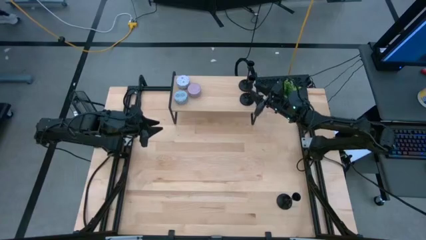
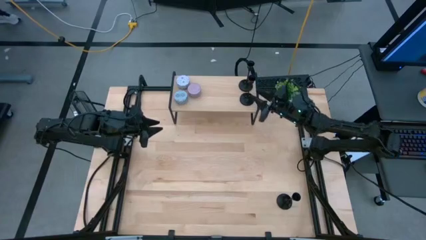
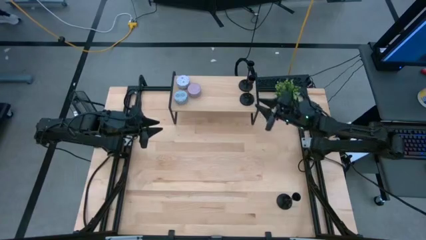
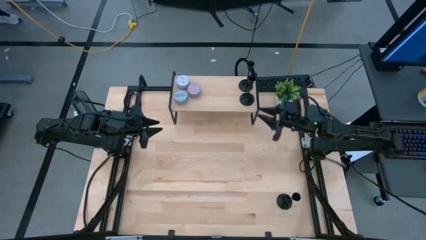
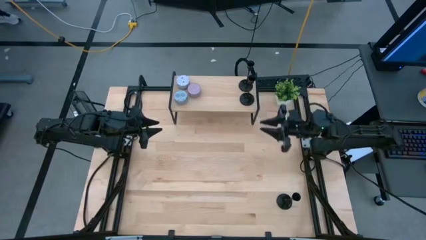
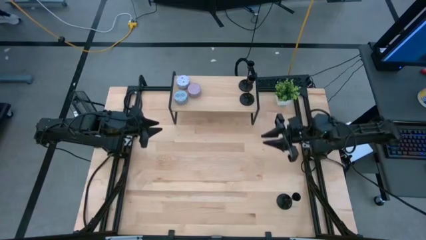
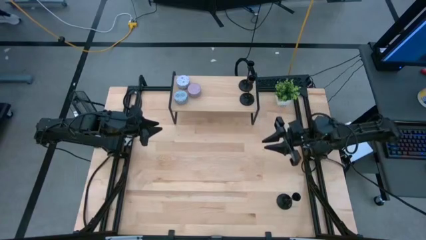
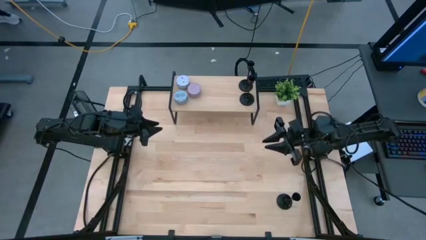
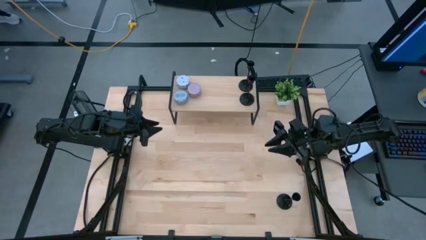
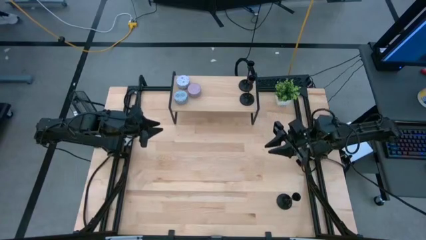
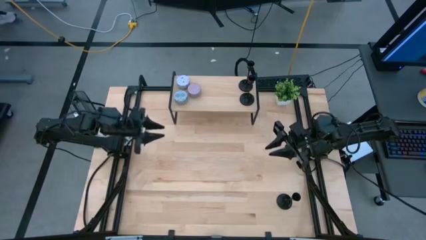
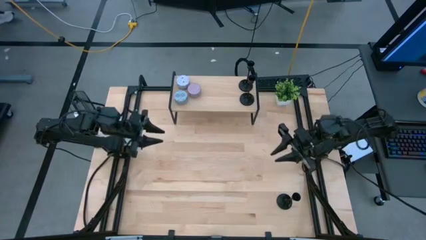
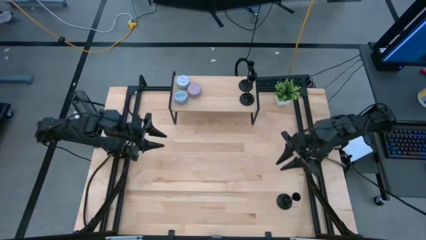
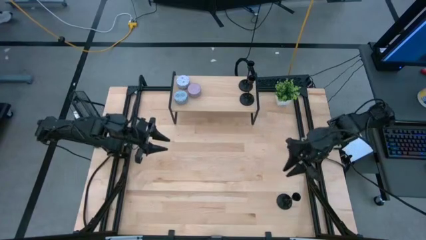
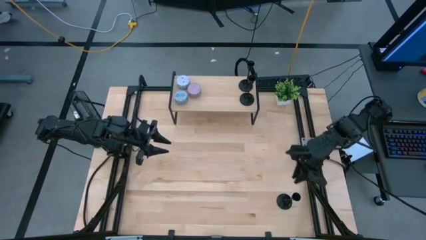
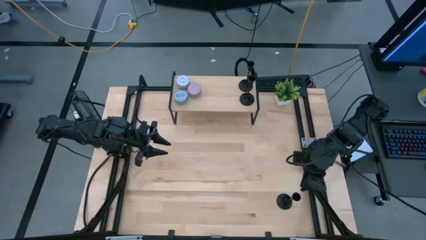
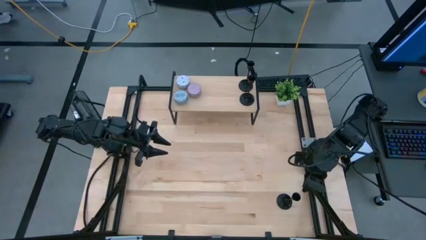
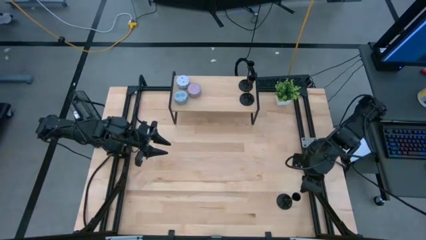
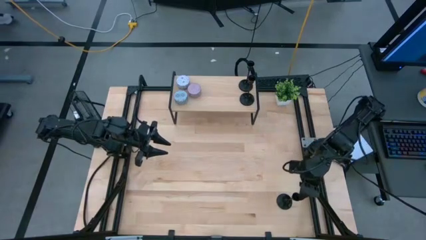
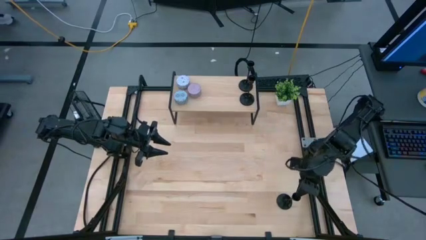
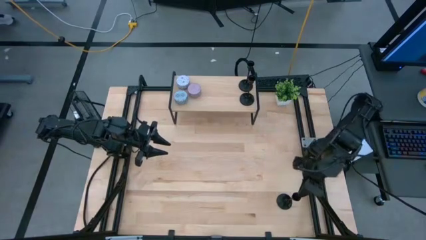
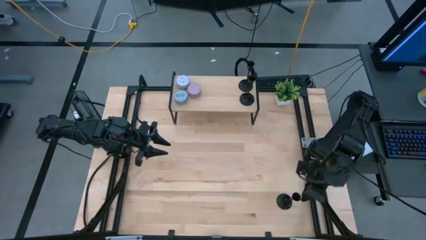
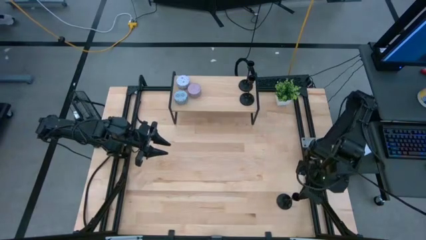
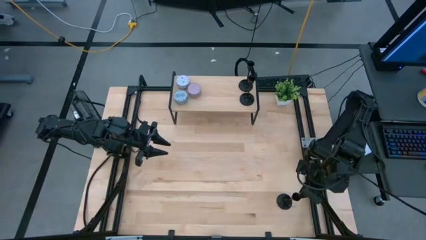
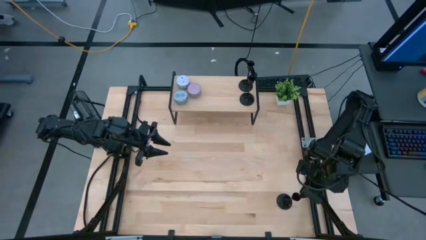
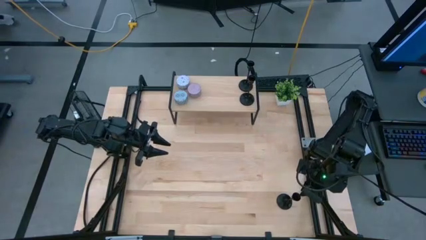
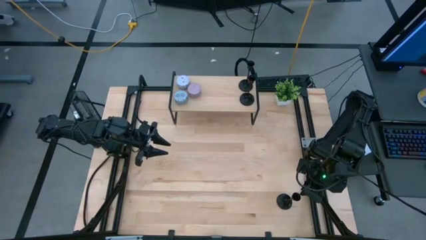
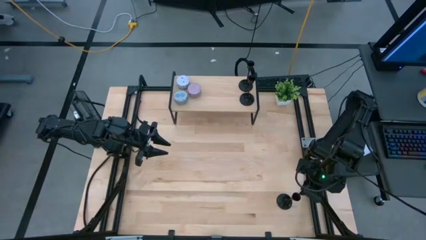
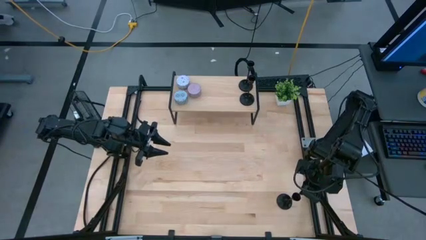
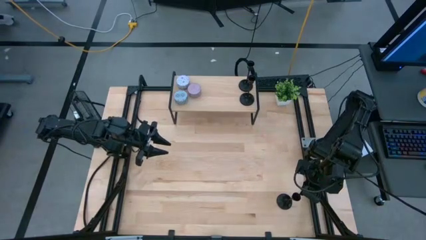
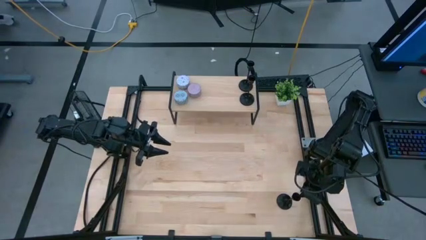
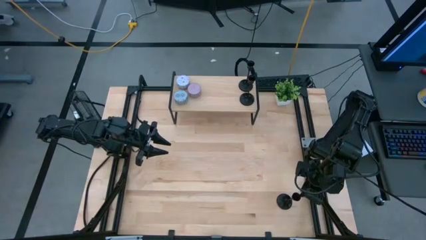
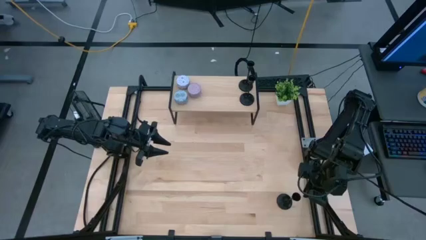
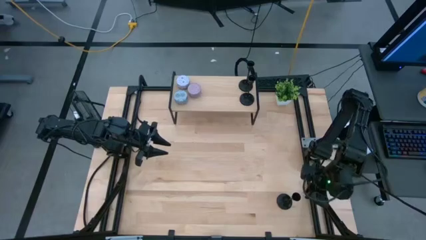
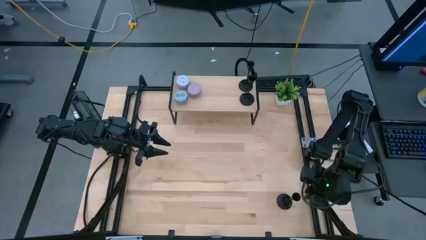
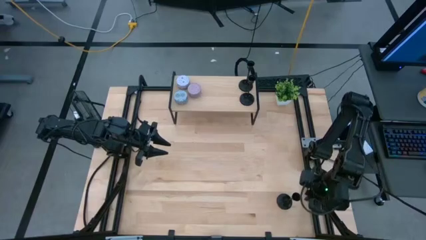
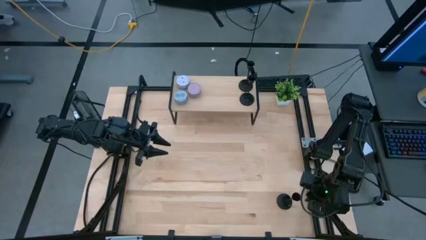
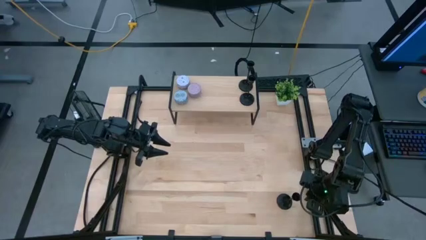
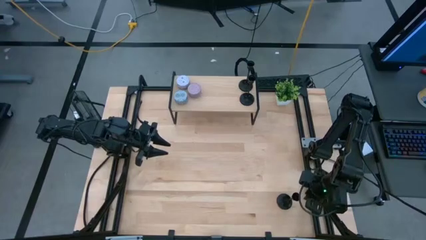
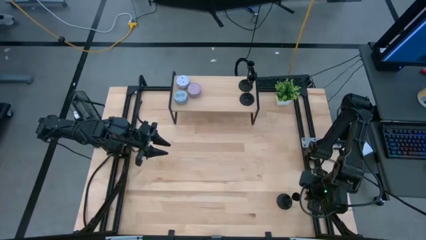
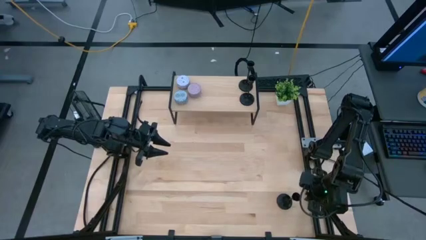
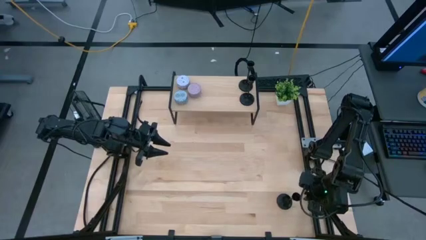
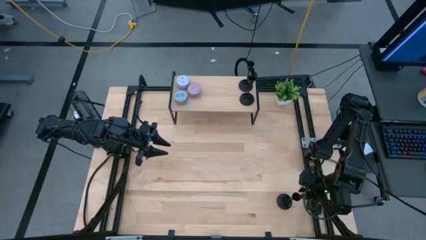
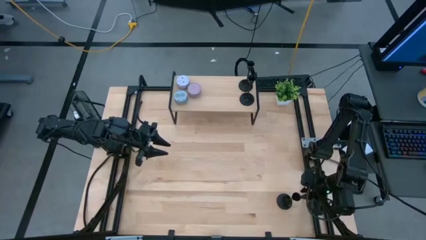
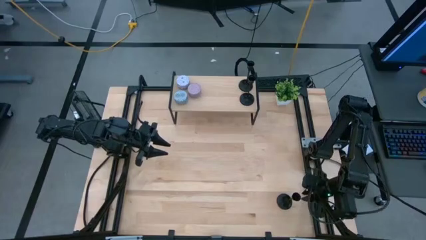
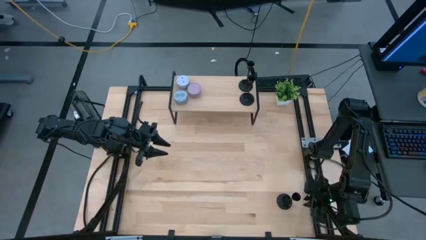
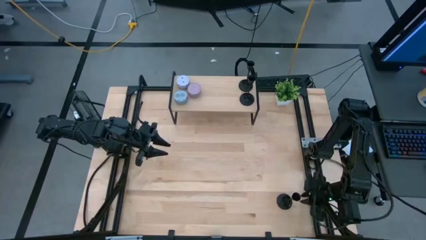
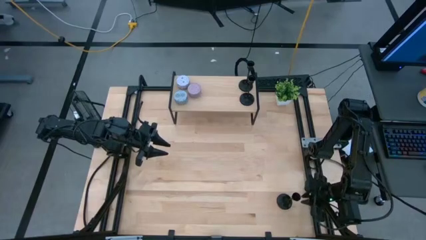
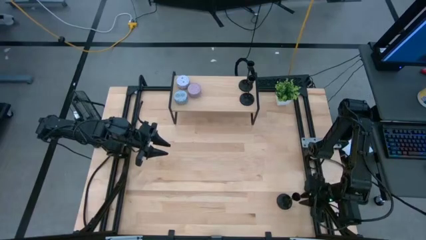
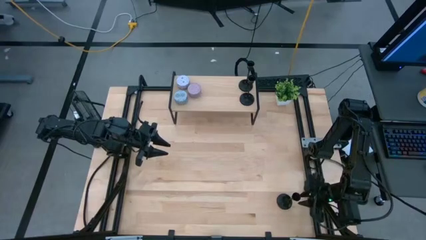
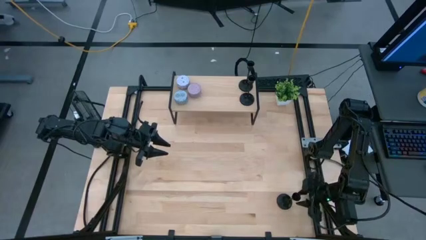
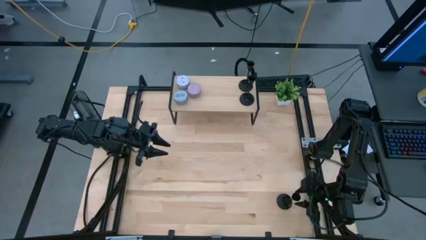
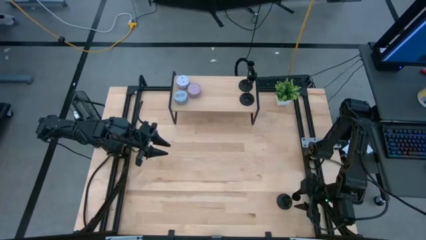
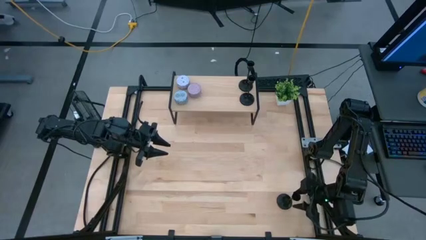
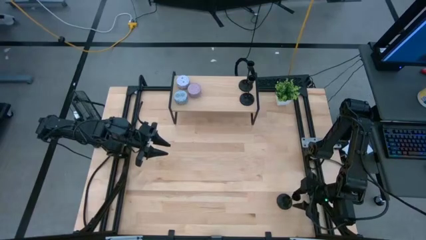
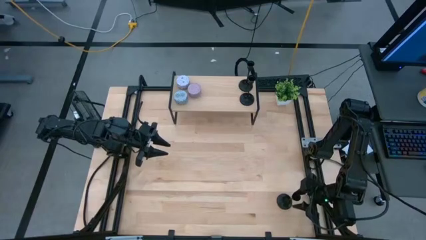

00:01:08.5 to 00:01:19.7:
Task: Pick & Place candle stick holders
Put the black candle holder on the shelf

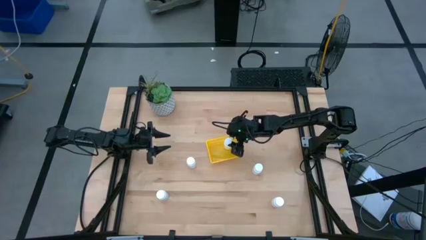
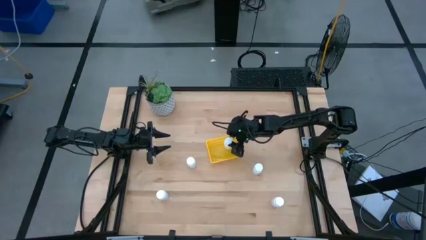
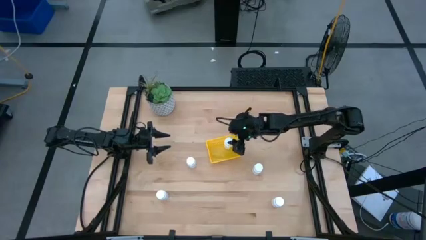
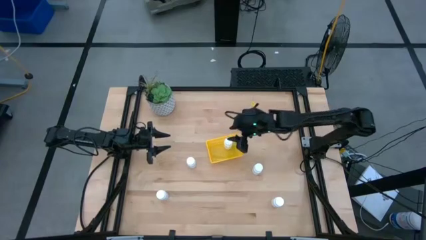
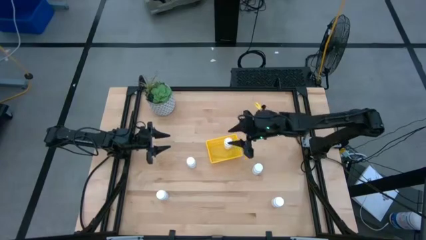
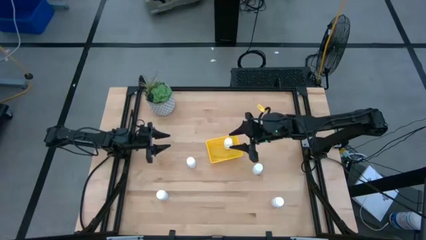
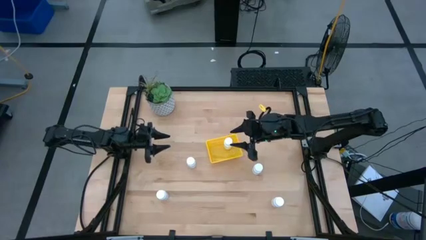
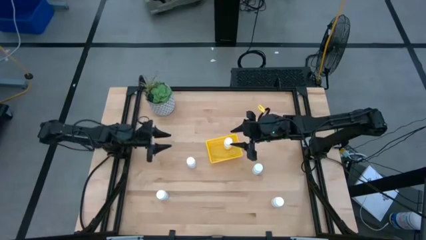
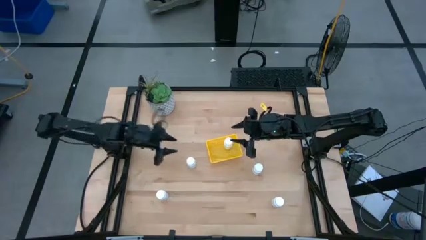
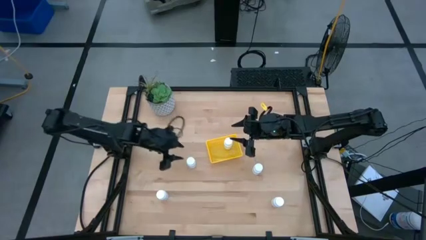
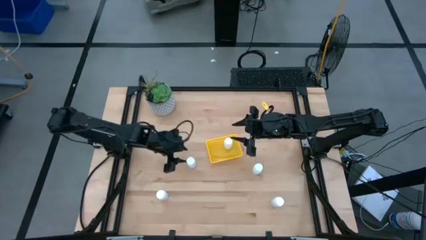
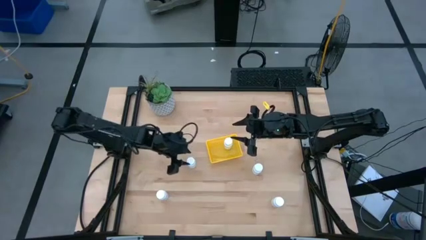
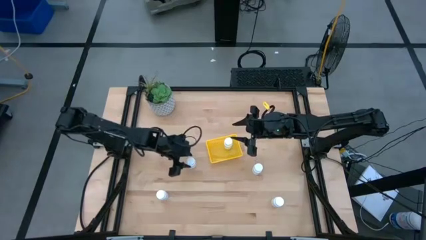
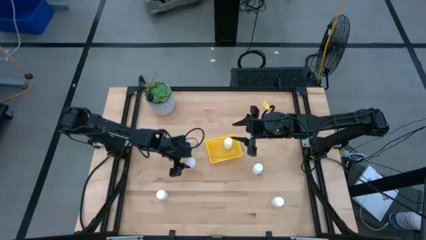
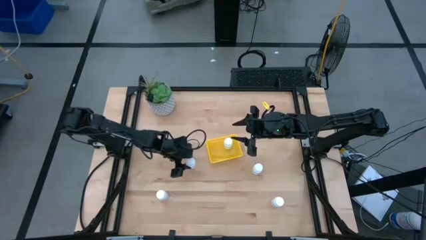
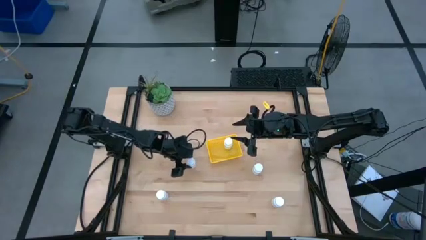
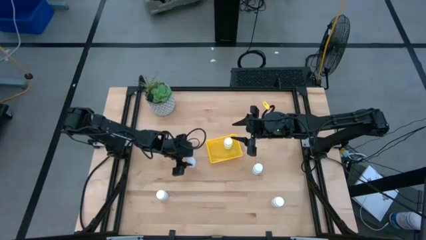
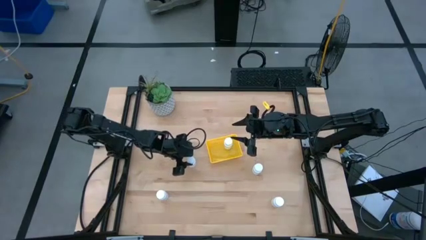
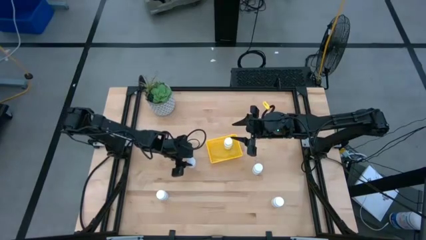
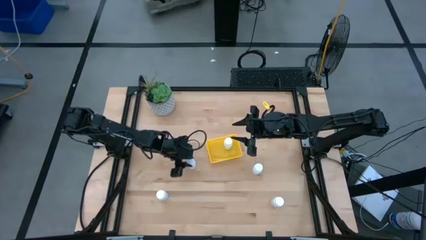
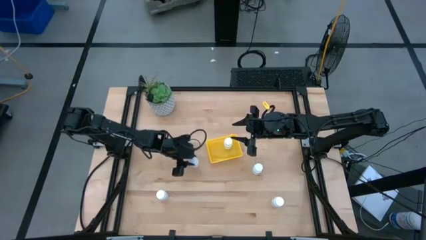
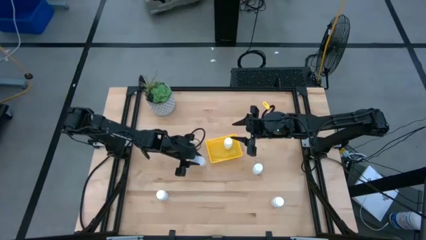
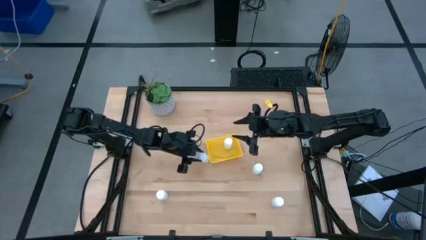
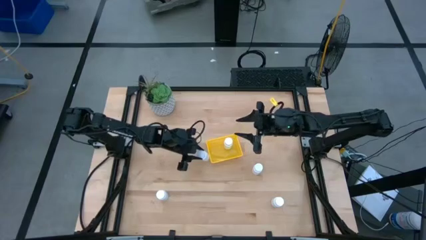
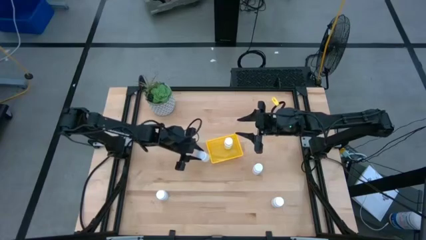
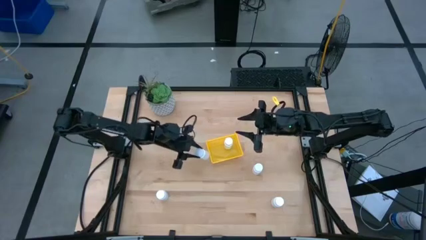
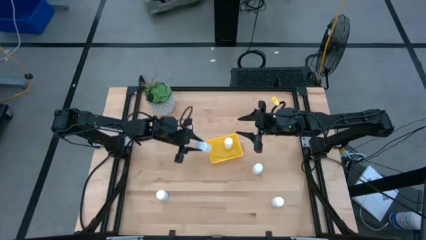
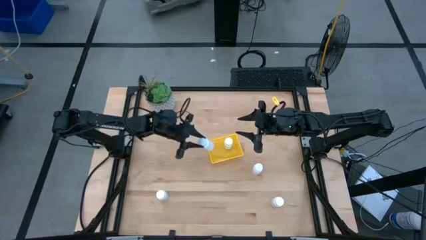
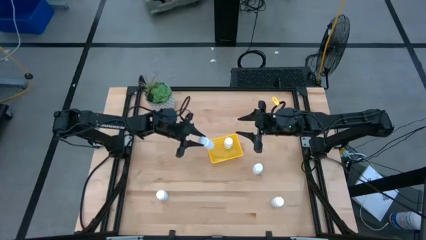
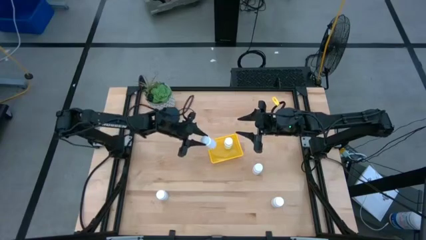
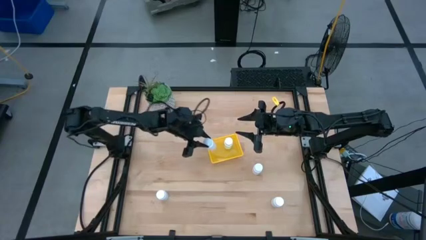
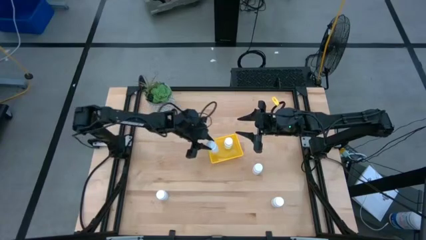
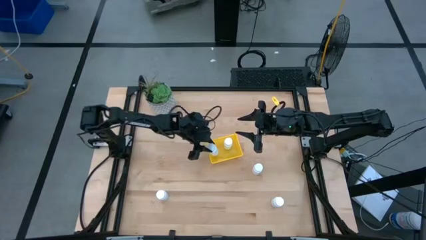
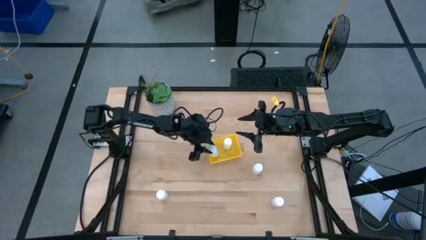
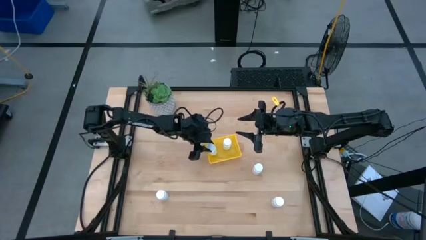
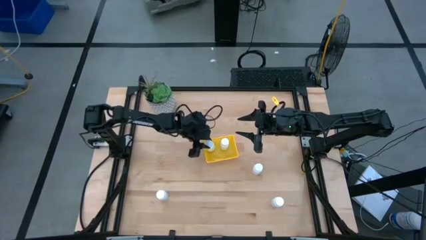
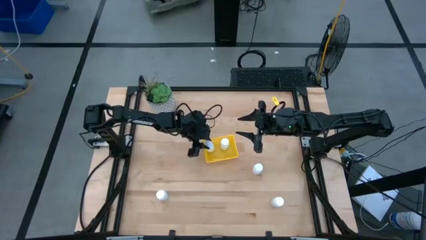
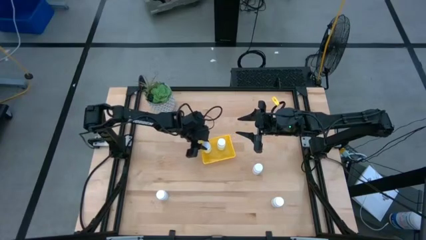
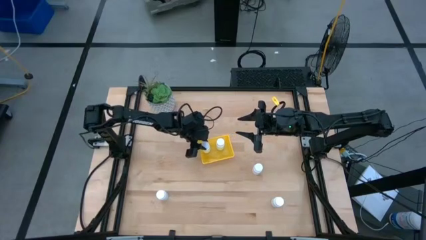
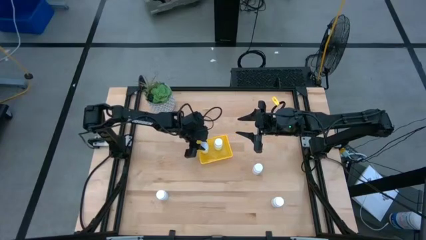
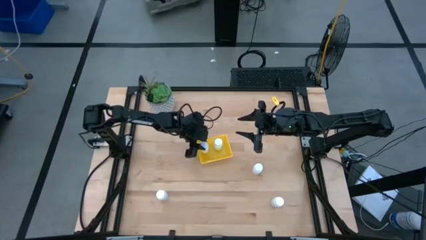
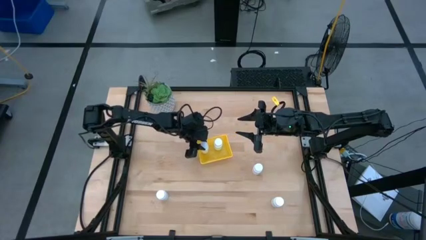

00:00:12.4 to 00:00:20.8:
Task: Pick and place pill bottles into a basket
Put the white medicine bottle into the yellow bin
